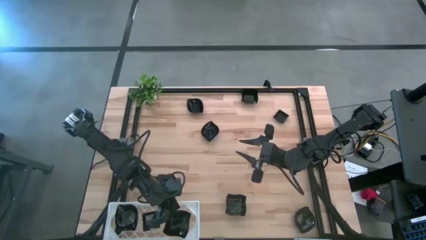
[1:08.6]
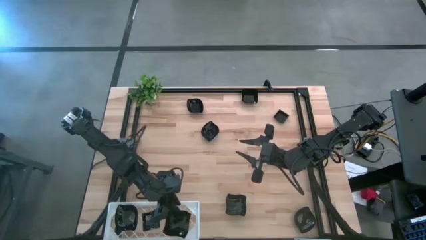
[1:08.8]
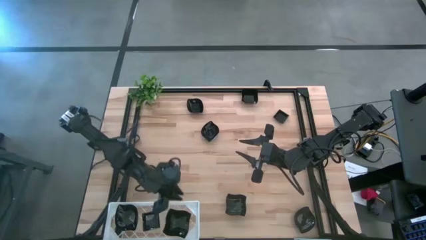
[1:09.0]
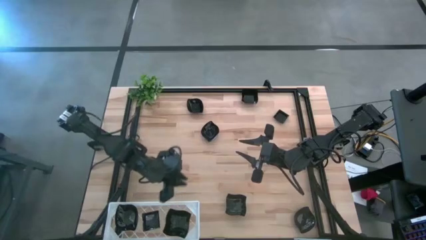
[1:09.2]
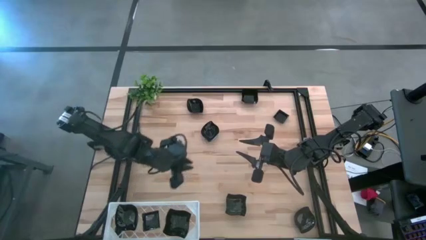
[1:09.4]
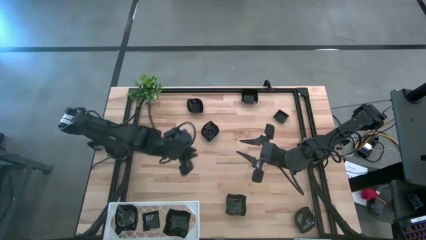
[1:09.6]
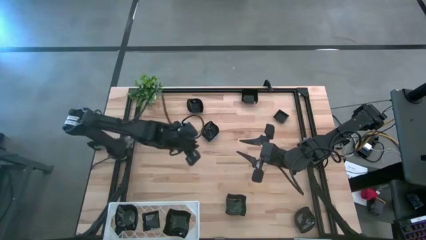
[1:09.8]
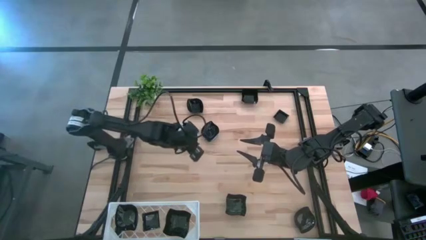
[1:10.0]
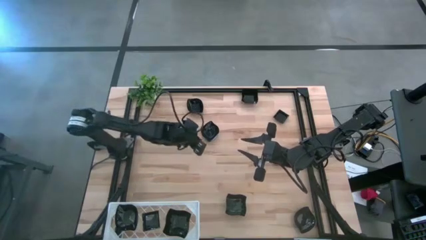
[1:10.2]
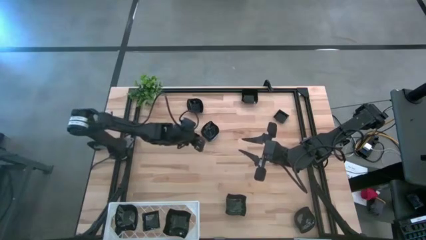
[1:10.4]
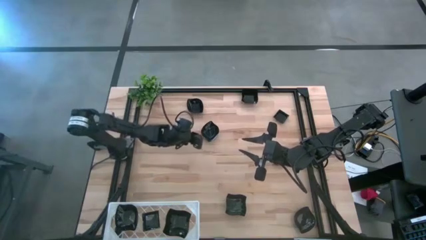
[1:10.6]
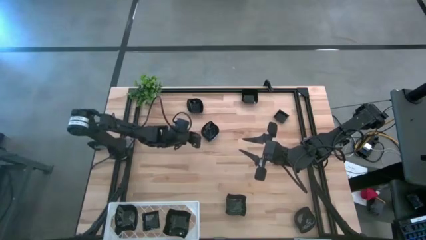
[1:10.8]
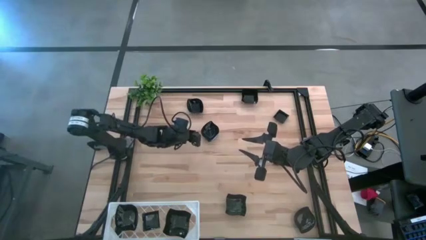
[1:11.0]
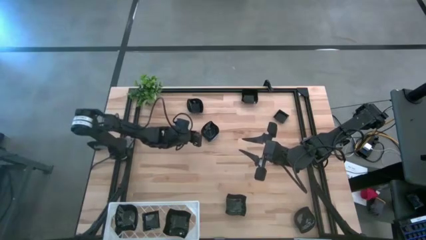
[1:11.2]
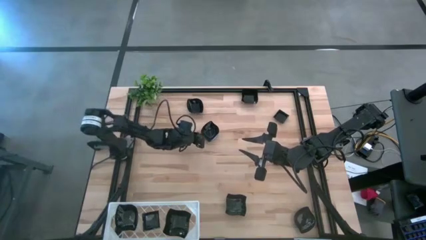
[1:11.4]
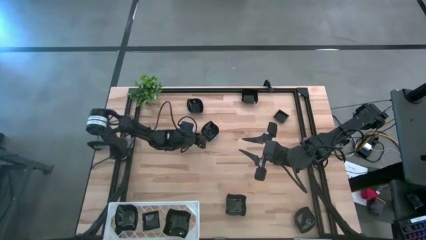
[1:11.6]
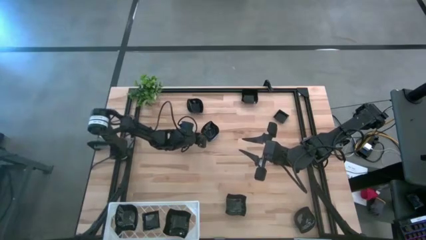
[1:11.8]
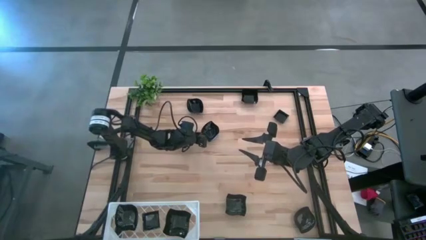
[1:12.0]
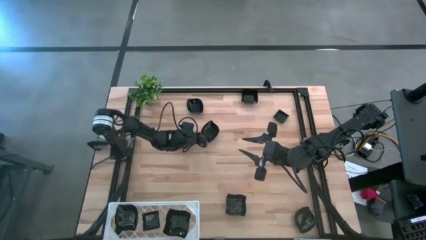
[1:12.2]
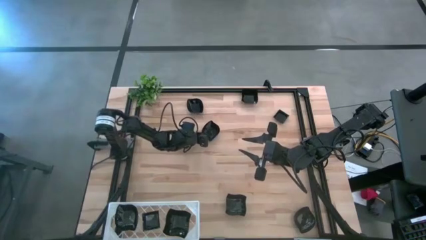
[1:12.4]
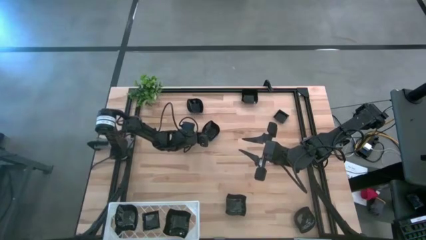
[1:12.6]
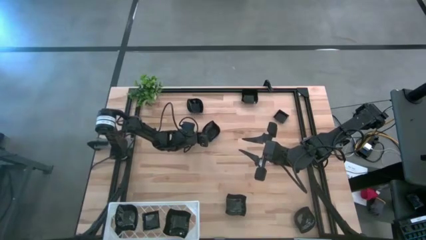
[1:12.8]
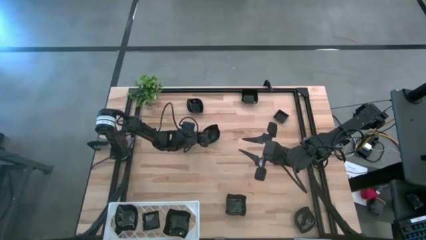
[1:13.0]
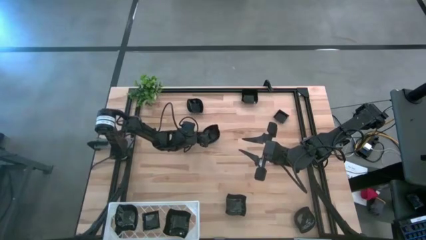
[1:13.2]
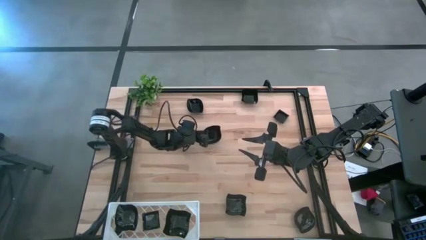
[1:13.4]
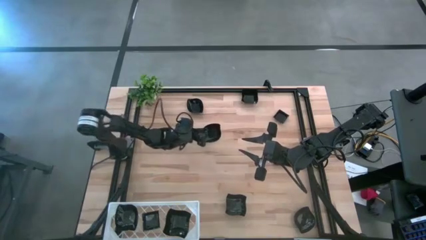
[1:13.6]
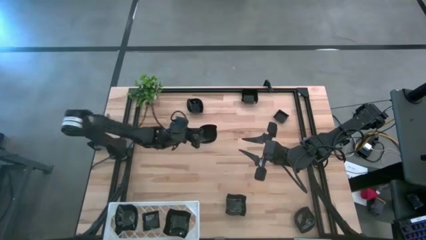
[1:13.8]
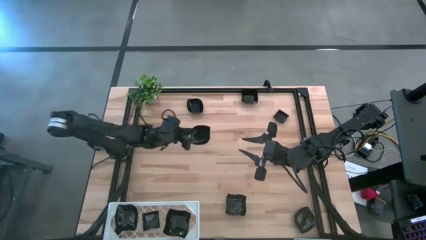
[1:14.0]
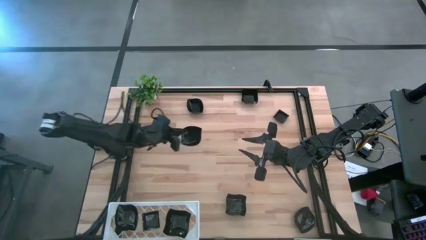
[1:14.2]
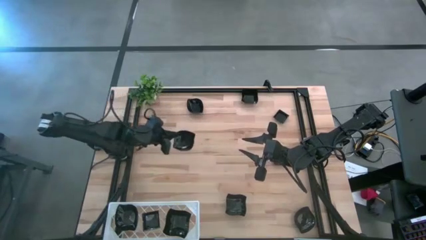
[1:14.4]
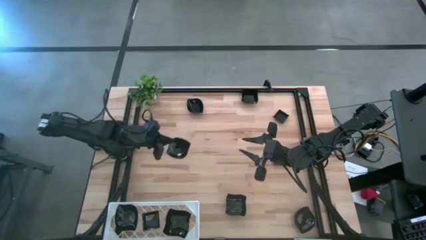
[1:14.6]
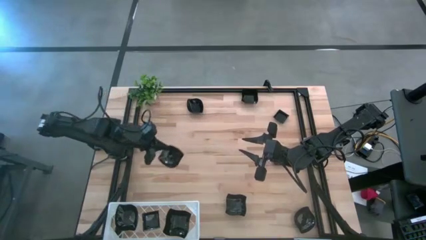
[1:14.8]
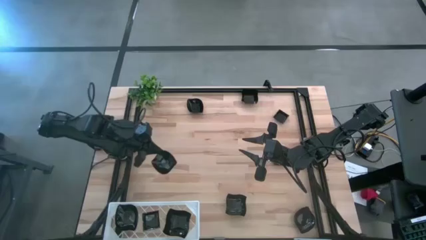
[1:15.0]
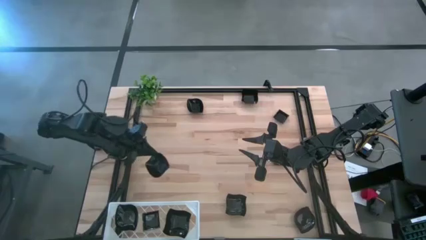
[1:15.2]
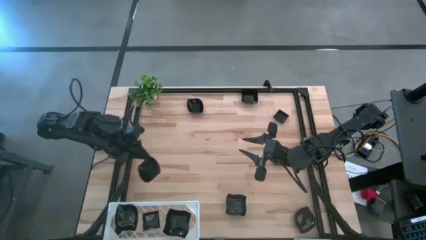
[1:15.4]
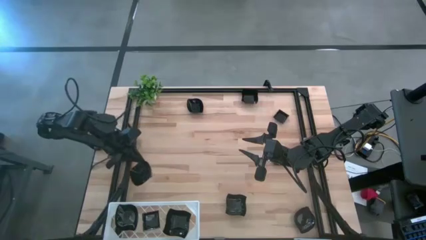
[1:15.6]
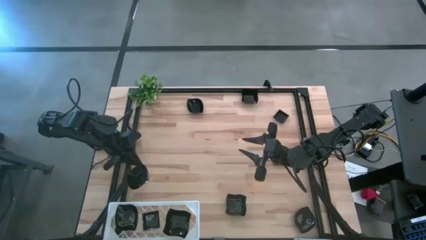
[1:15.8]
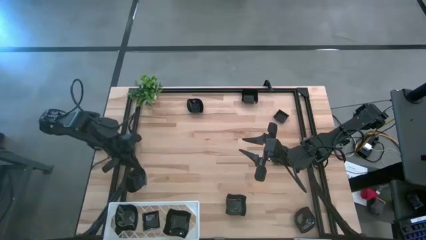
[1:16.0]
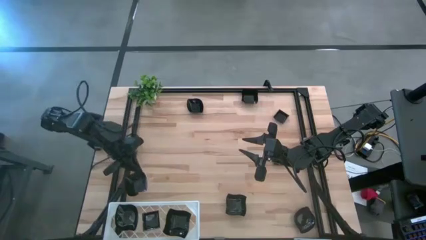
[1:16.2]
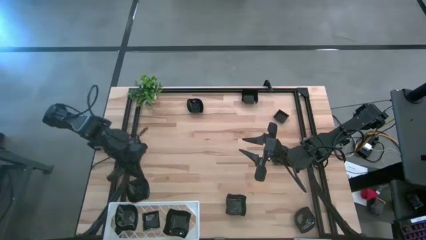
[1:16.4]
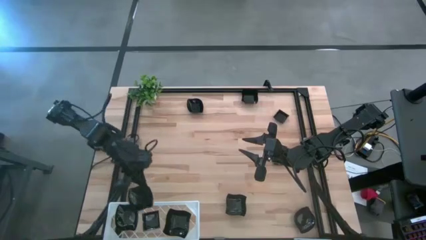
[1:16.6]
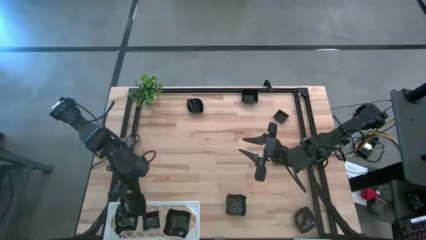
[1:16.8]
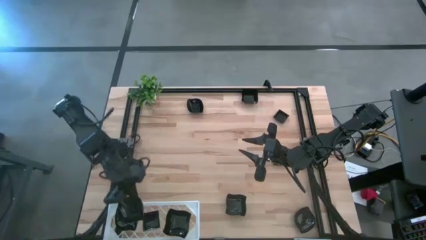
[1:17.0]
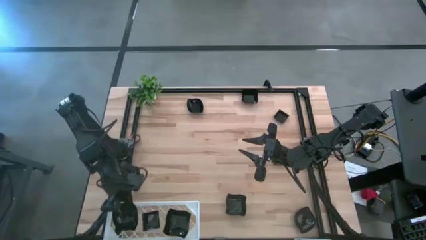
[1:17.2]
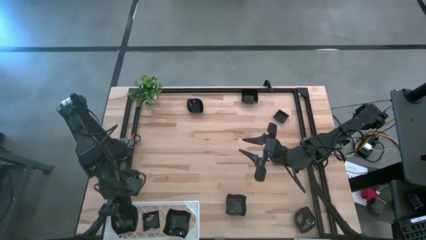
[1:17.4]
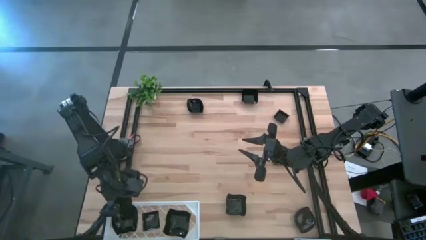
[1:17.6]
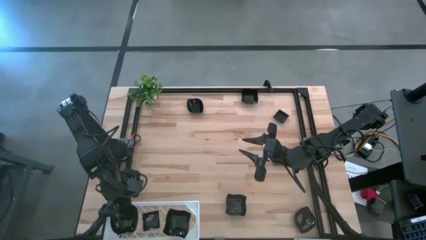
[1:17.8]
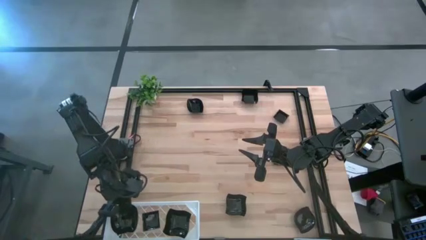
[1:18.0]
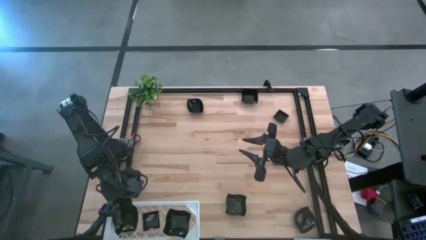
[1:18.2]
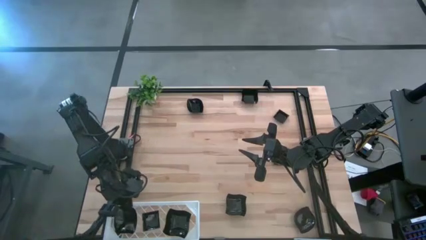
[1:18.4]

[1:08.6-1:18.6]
Task: Pick & Place Mini shaped plates
Stack the black leaf shaped plate on top of the other black leaf shaped plate on the shelf

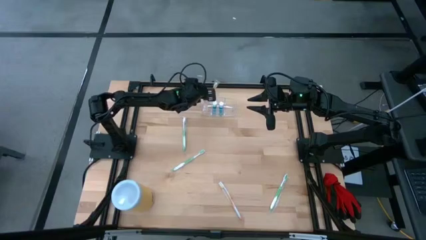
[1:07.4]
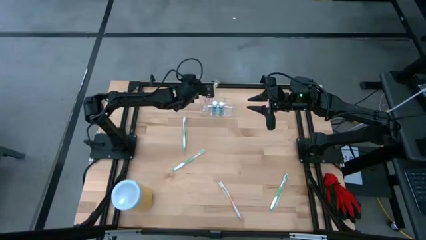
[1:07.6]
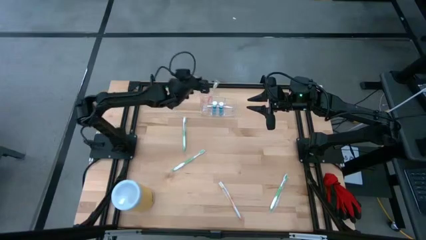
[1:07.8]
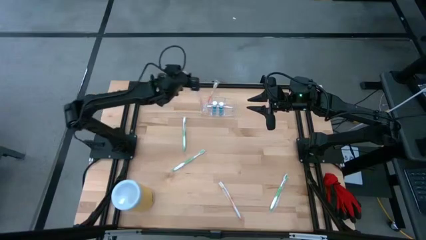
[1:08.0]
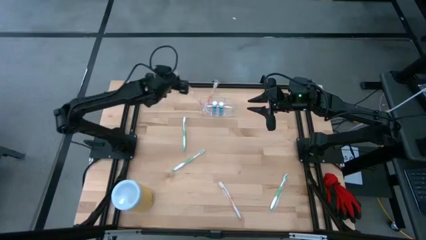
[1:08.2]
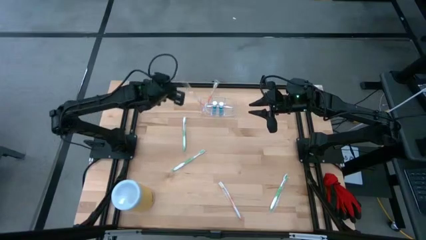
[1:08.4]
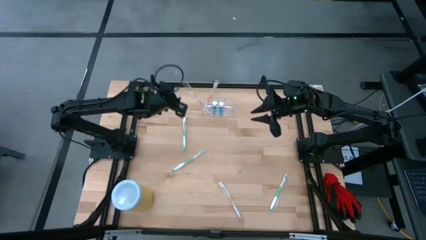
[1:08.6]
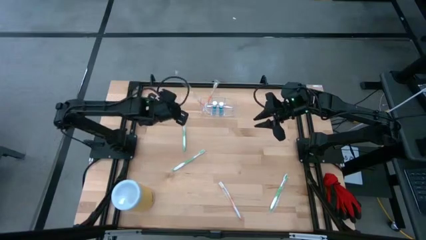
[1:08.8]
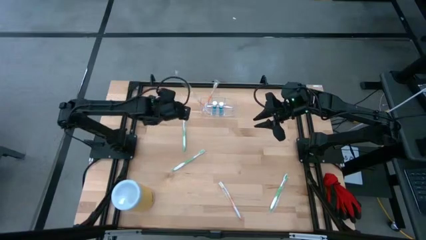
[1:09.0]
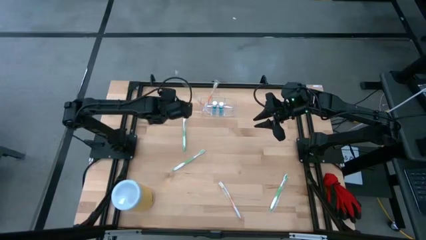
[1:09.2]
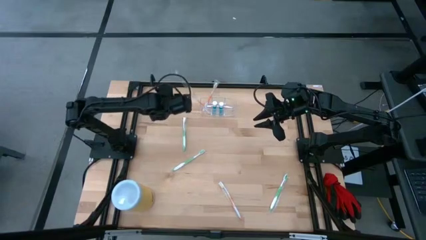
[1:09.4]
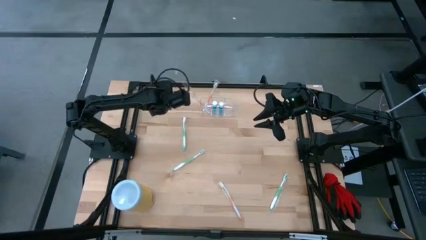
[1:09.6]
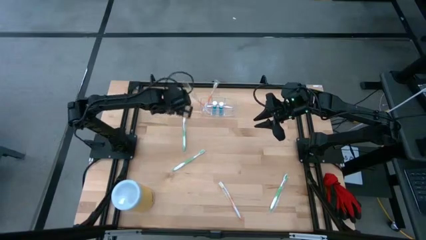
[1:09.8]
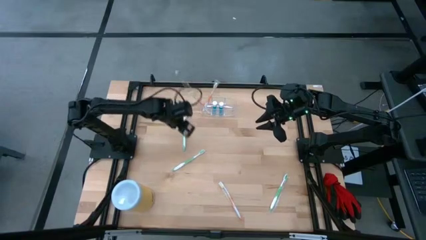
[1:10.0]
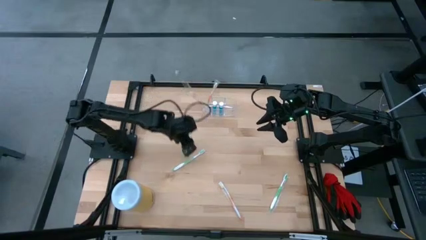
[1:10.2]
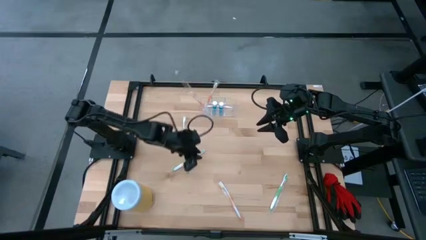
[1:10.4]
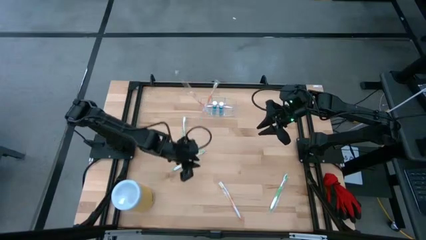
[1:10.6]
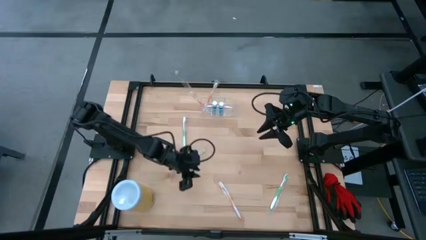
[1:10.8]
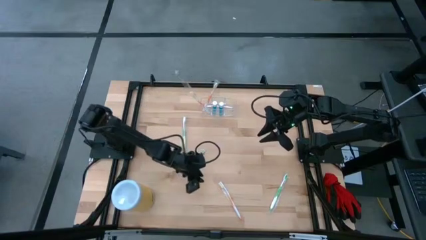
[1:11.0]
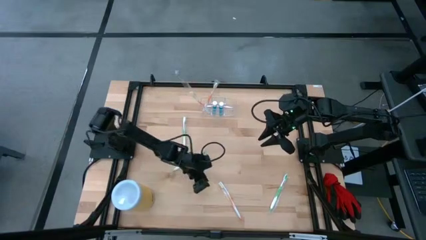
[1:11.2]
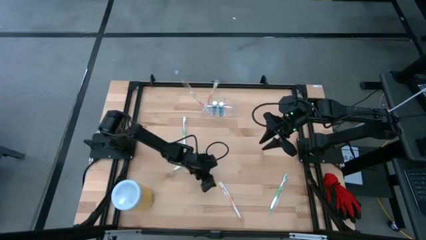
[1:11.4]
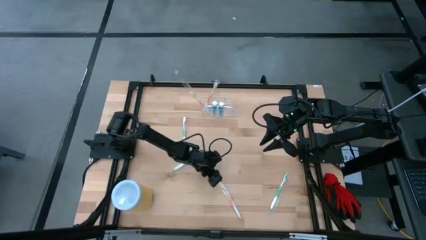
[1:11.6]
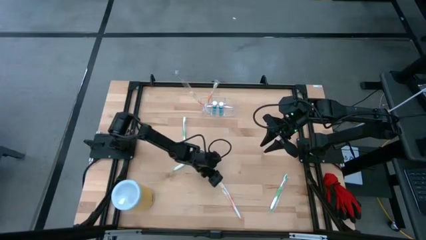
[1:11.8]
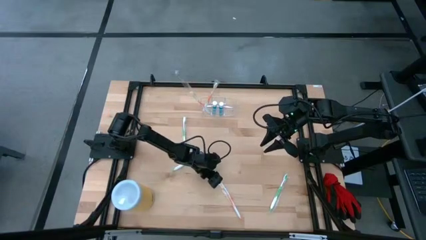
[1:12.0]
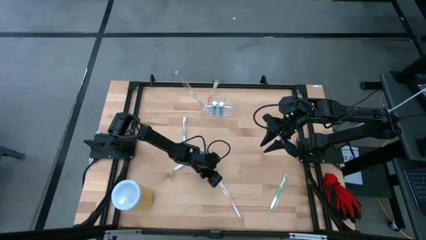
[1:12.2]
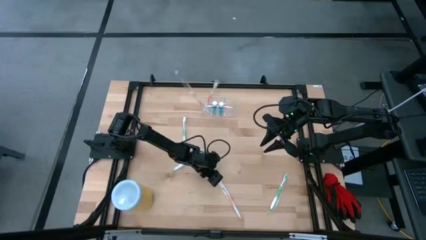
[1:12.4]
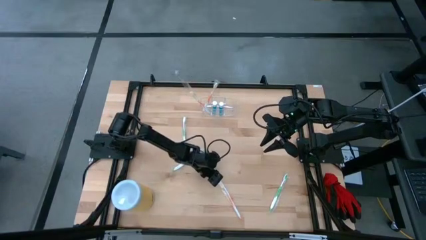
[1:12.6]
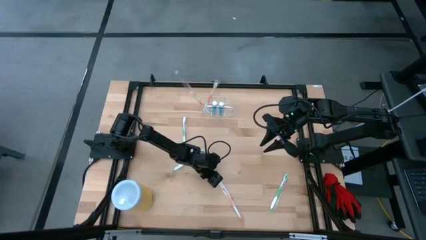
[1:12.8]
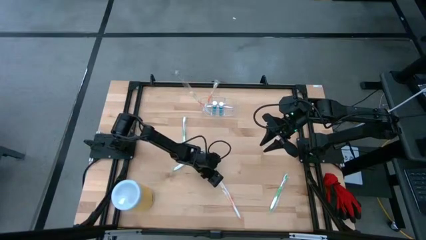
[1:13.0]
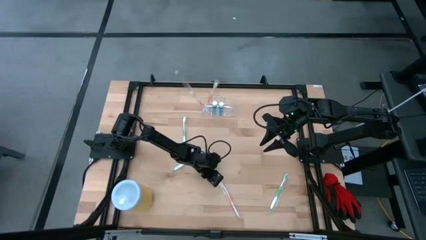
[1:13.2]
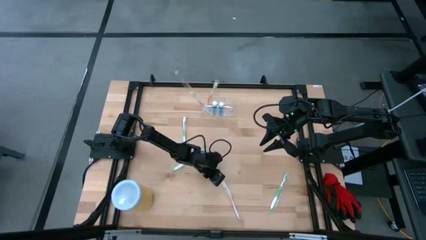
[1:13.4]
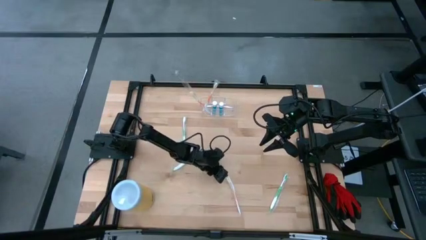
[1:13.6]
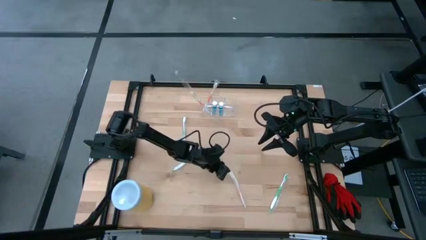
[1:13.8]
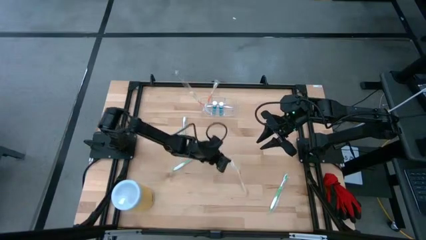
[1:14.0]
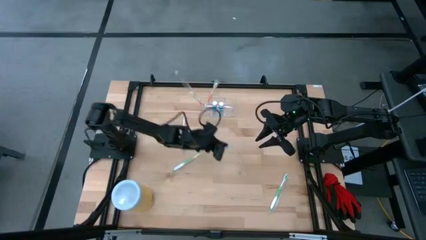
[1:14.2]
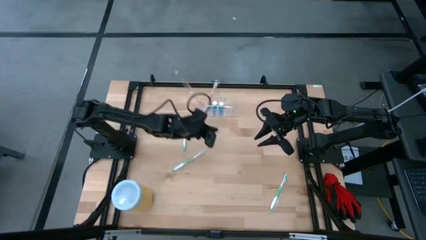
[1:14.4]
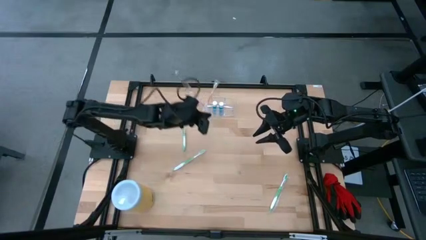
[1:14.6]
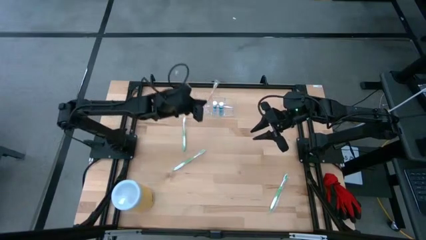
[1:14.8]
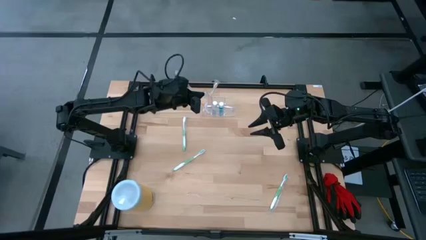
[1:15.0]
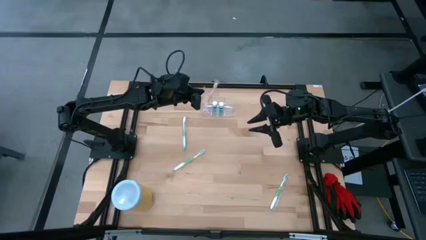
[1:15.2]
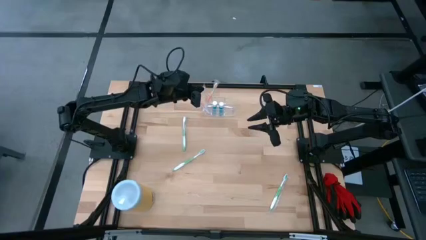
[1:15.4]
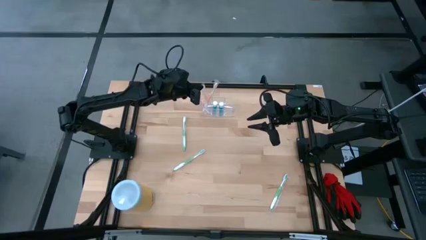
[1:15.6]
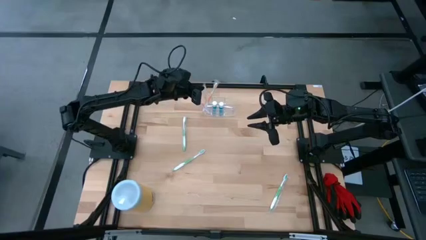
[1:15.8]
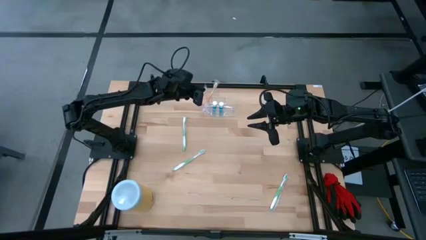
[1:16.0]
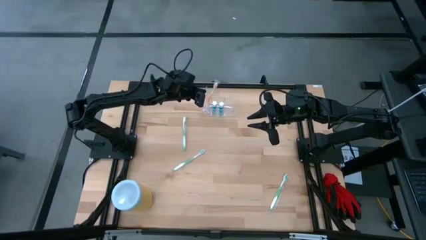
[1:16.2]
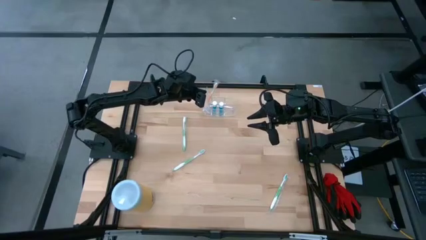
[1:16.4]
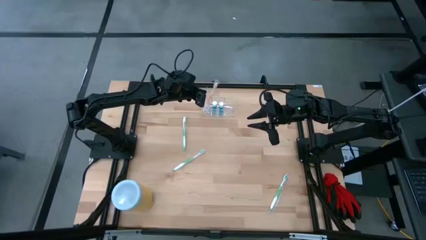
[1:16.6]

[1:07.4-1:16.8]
Task: Pick & Place toothbrushing station
Put the orange toothbrush into the transparent organizer
